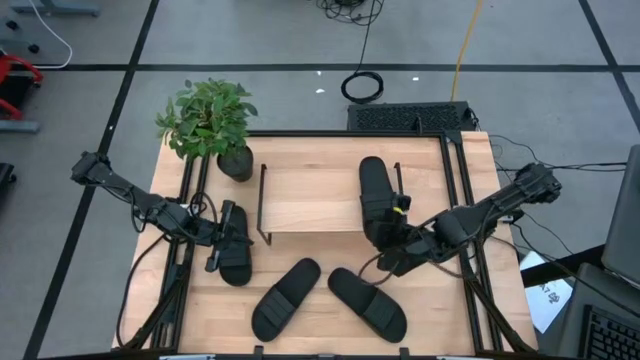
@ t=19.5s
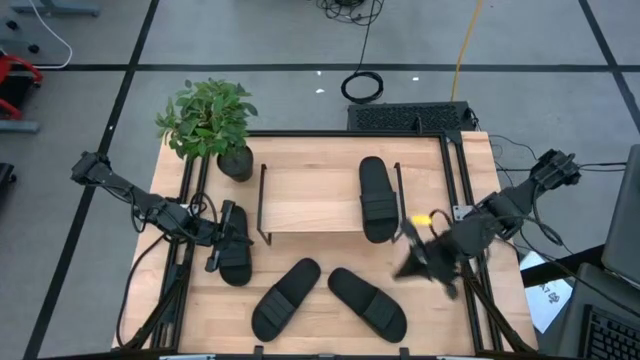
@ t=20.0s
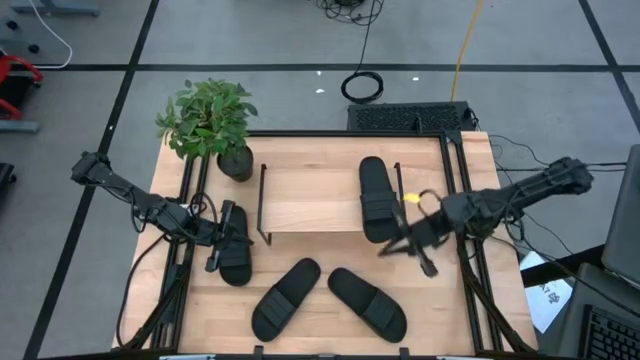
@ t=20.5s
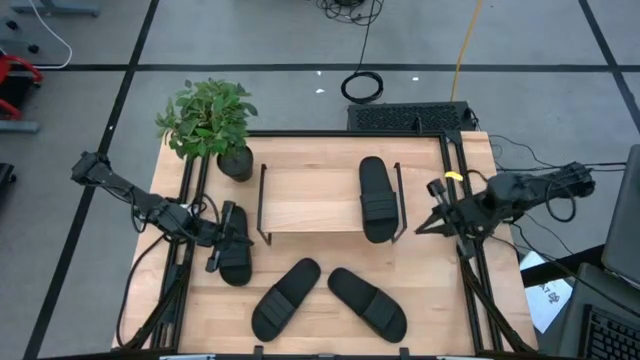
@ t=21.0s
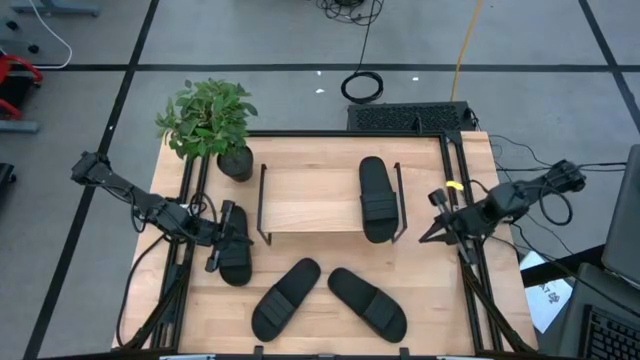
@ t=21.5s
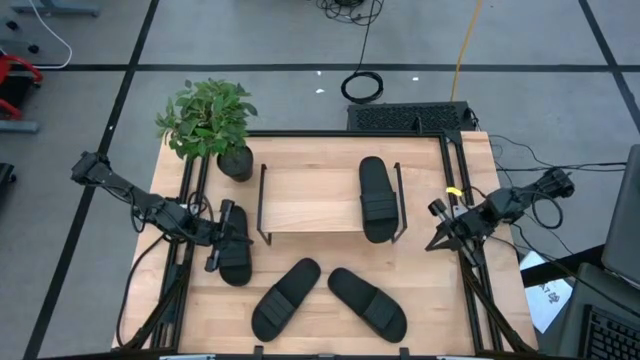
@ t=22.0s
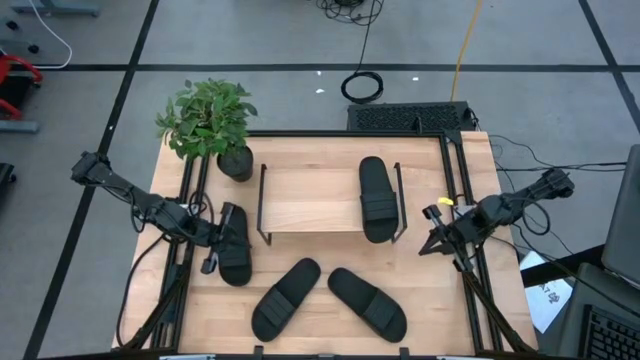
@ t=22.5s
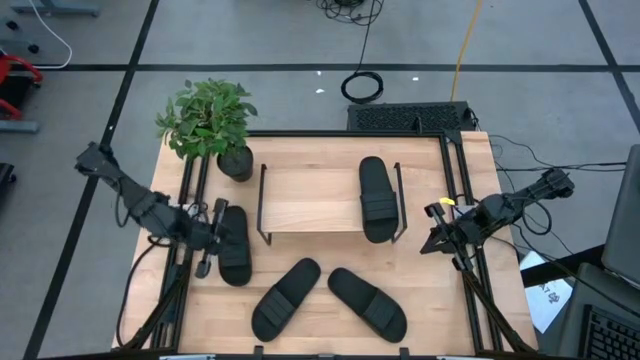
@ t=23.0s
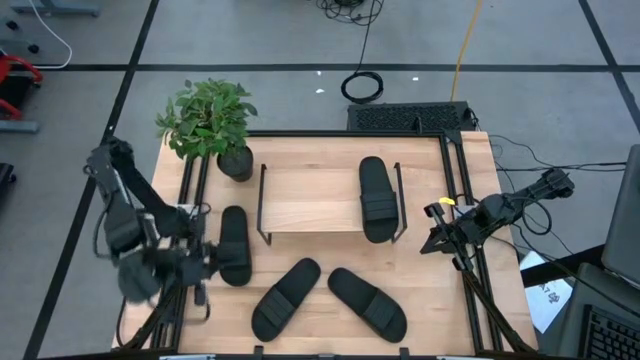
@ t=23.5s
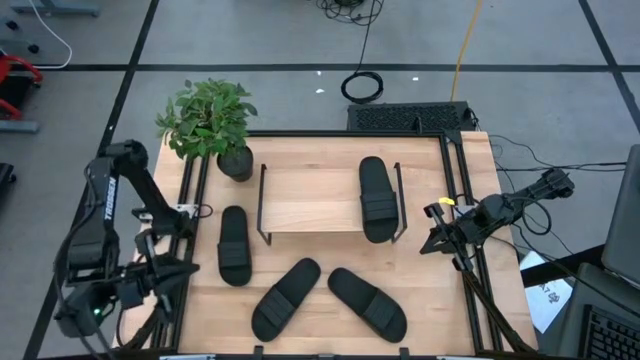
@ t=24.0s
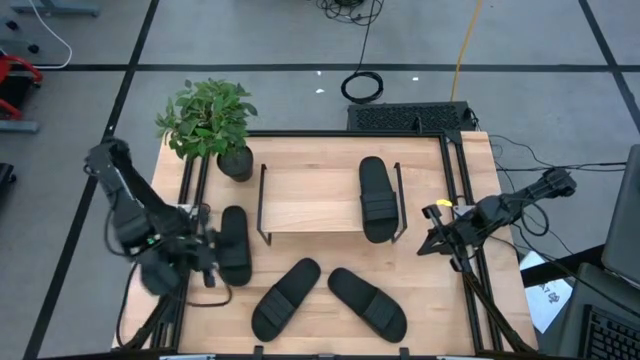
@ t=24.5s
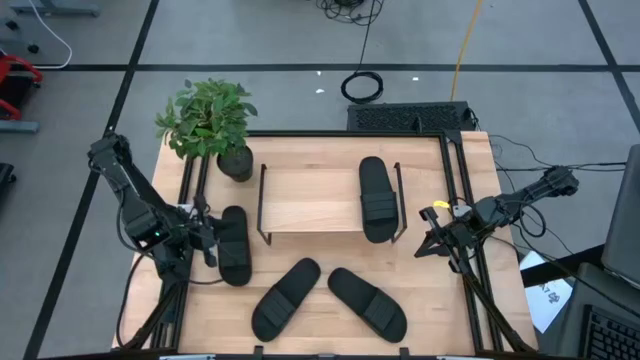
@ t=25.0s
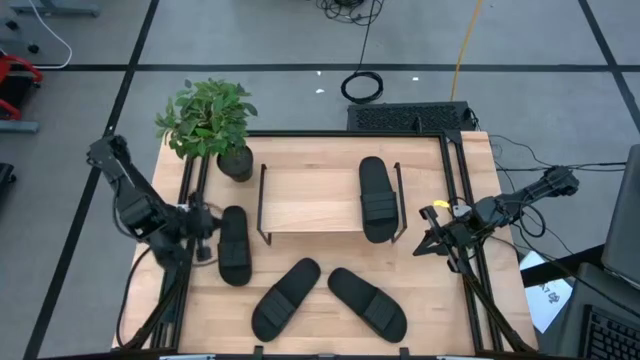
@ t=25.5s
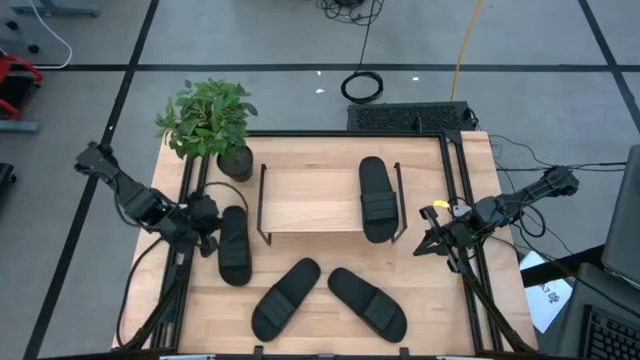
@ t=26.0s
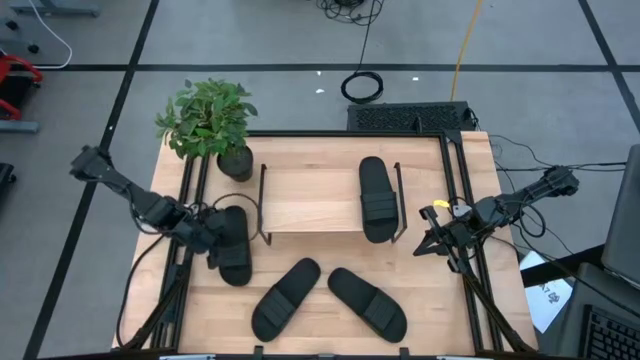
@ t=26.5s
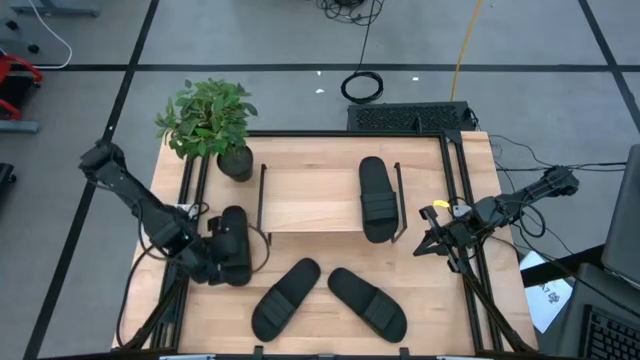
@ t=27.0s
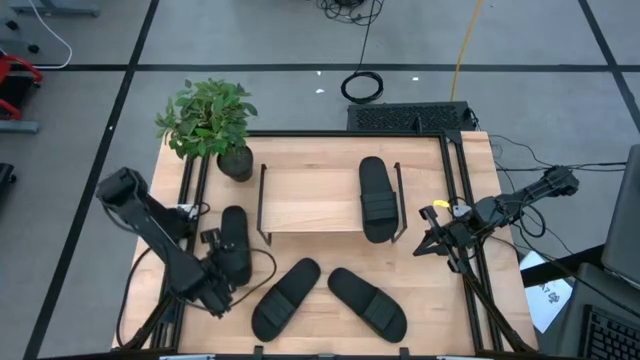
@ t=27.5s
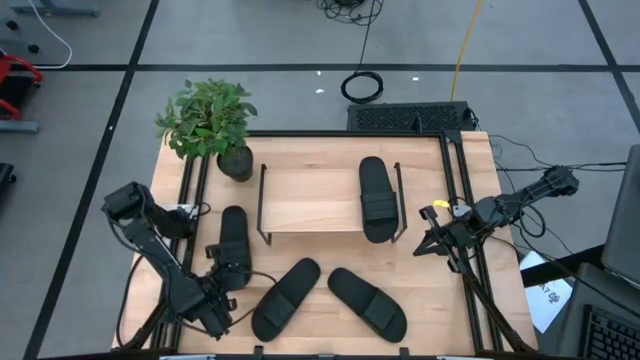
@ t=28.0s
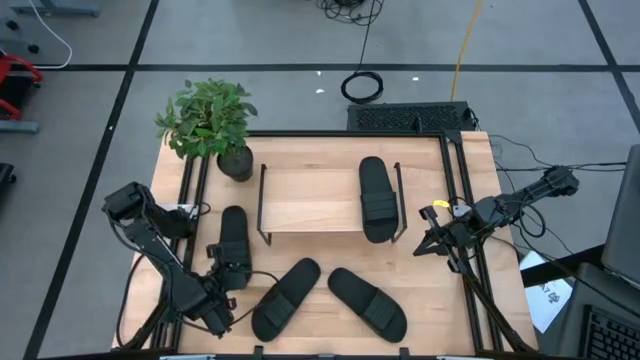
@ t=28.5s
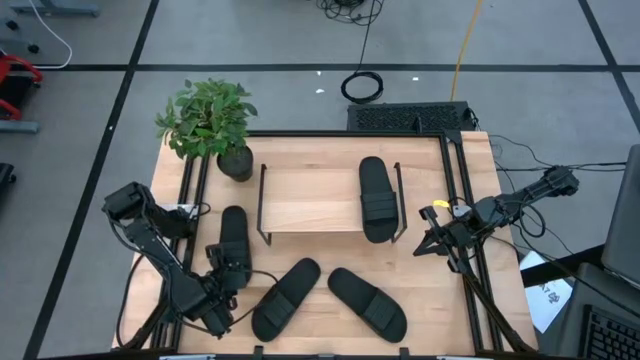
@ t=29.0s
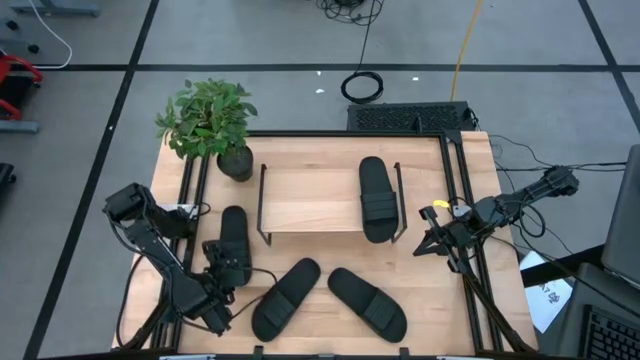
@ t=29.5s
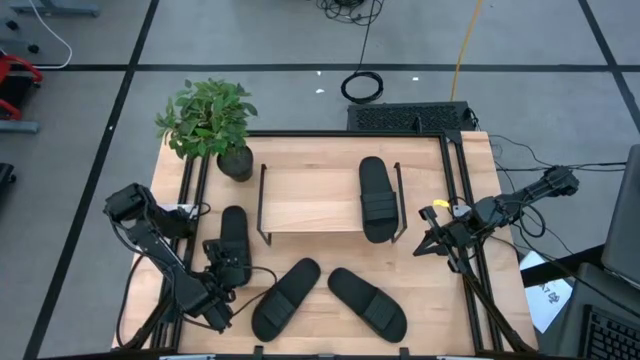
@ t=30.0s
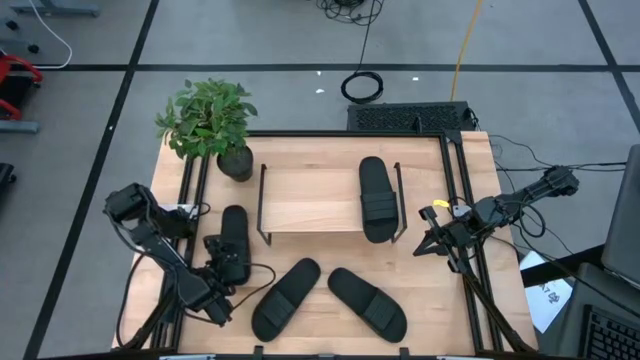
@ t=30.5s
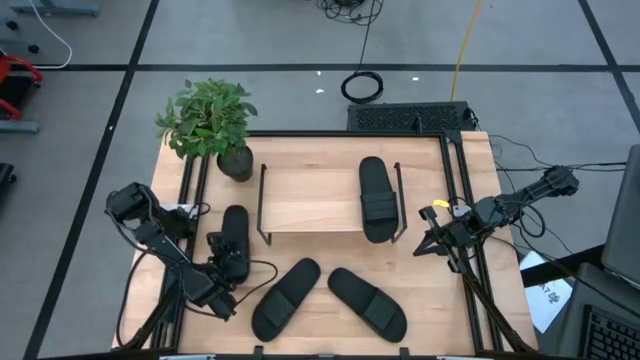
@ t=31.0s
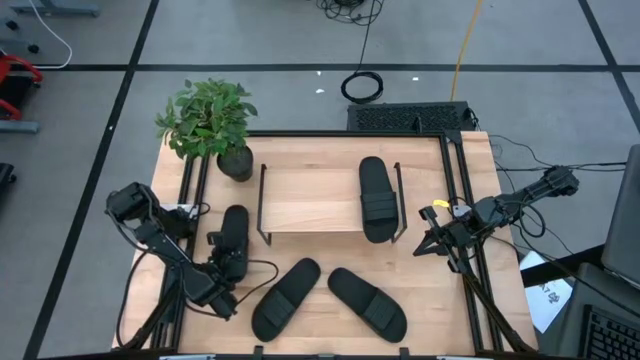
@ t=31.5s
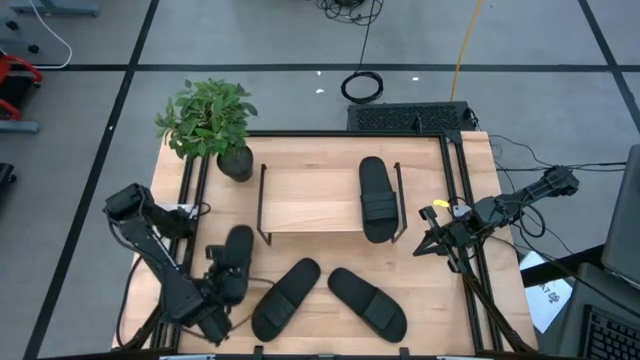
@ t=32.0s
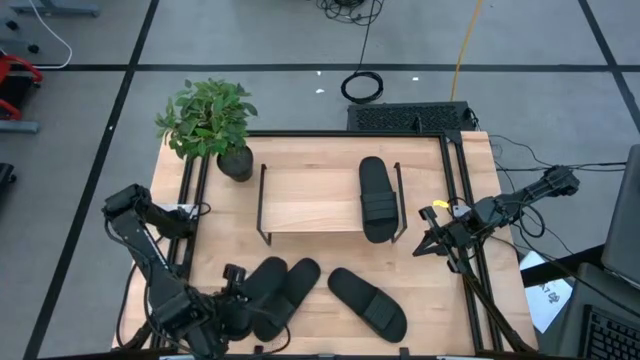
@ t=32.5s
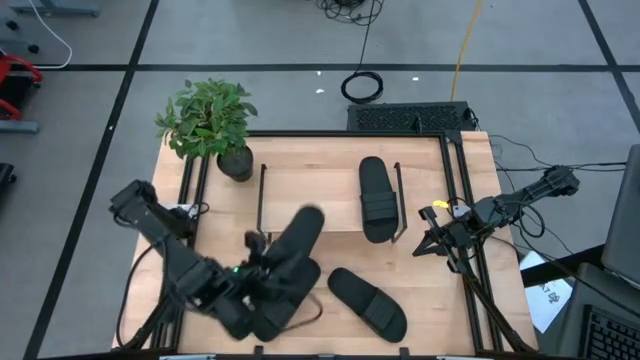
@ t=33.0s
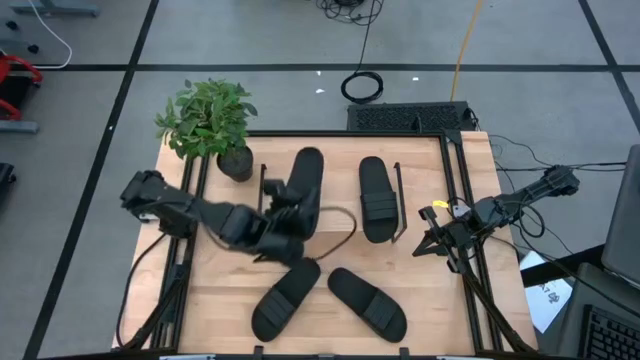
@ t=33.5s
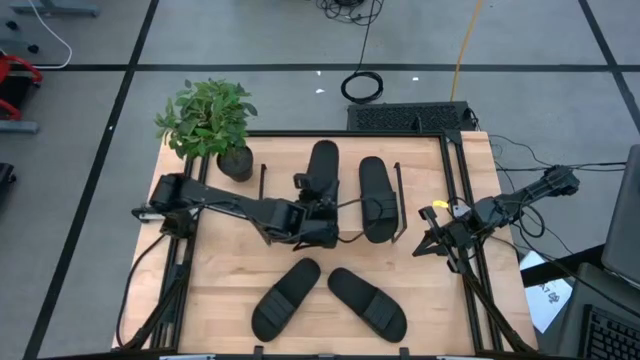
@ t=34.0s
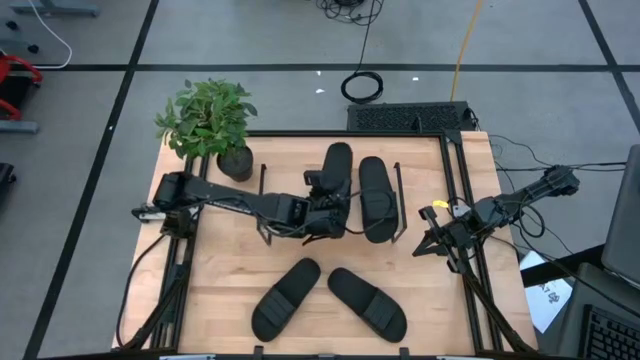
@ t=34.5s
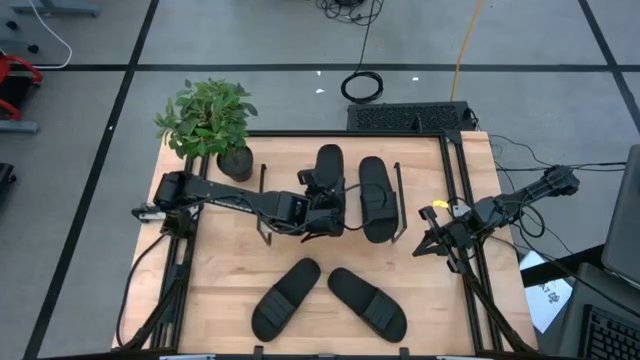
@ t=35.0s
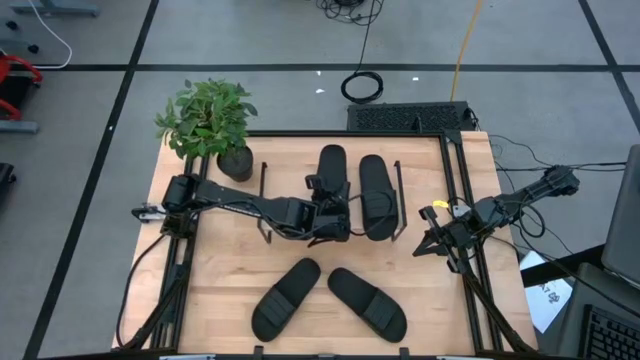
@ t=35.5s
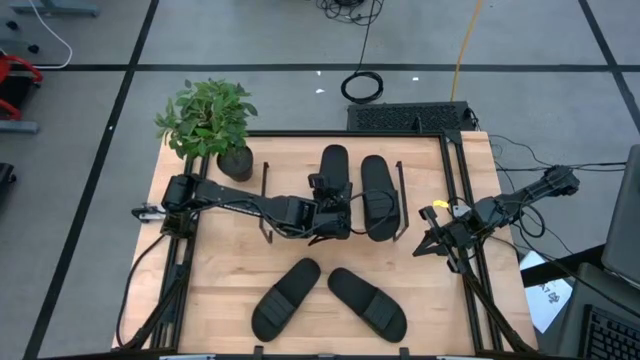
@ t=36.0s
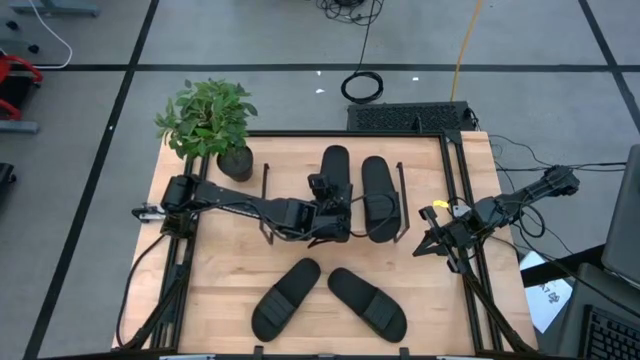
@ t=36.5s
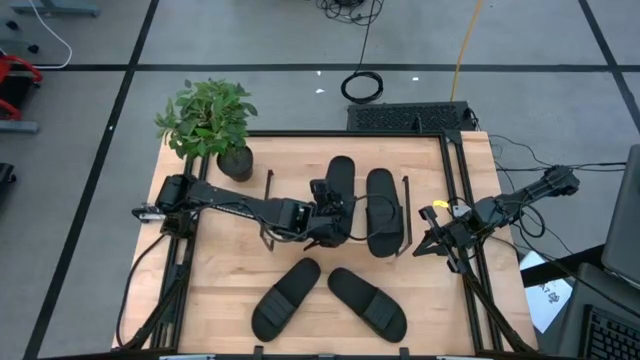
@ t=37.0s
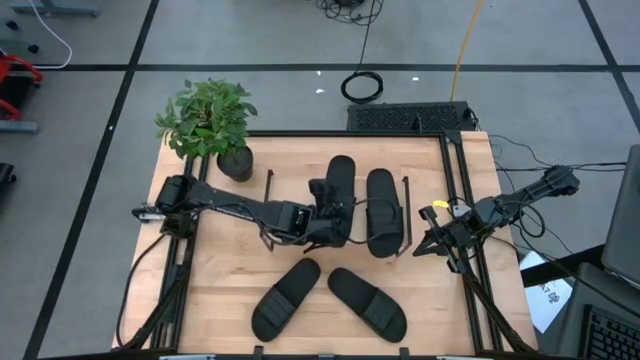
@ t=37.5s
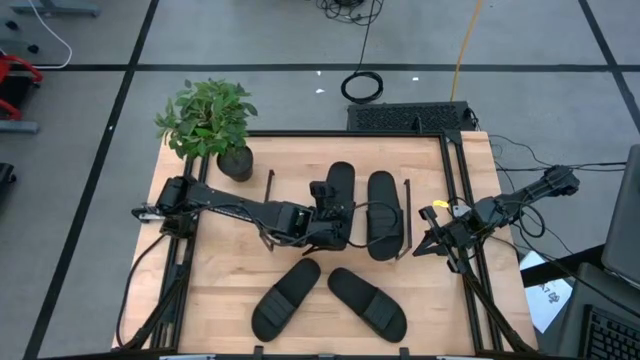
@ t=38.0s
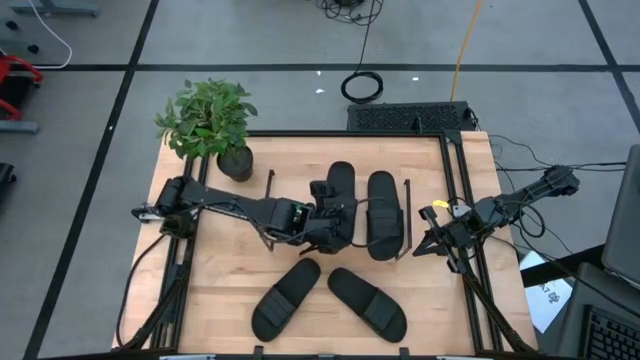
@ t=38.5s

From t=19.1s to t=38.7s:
Task: Pick and place slides into the shelf
Put the black slipper on the shelf

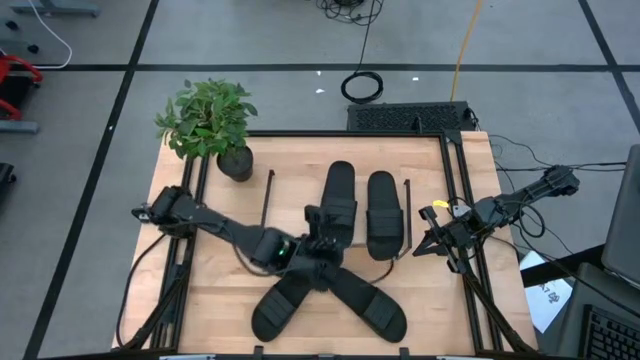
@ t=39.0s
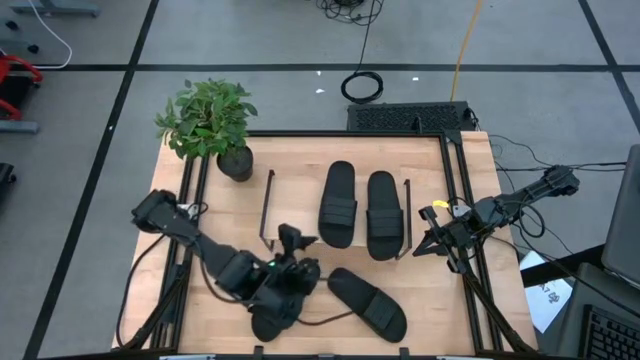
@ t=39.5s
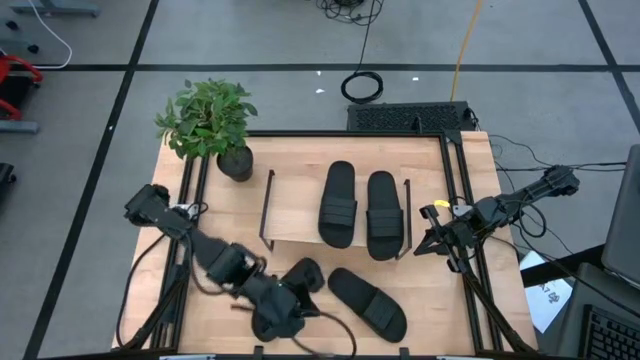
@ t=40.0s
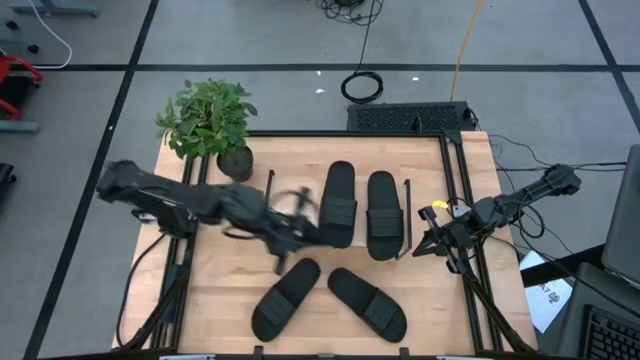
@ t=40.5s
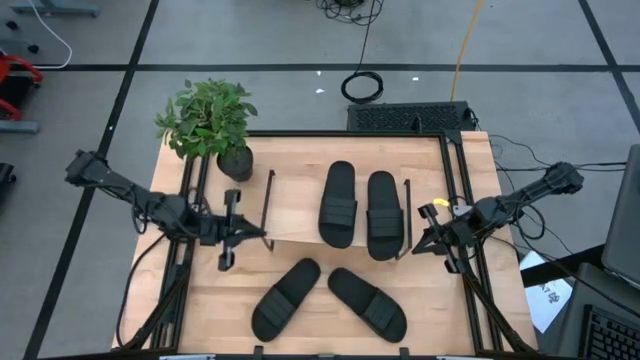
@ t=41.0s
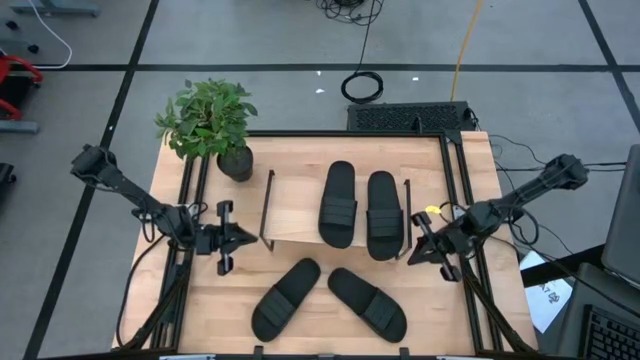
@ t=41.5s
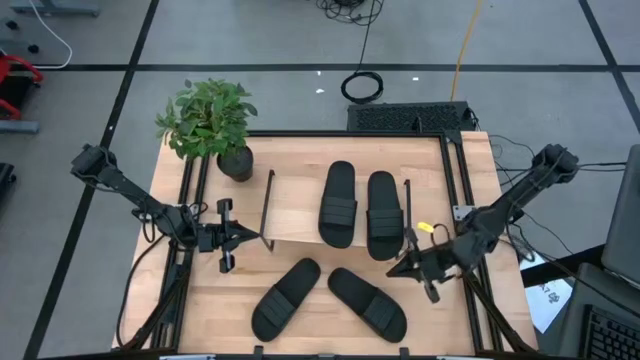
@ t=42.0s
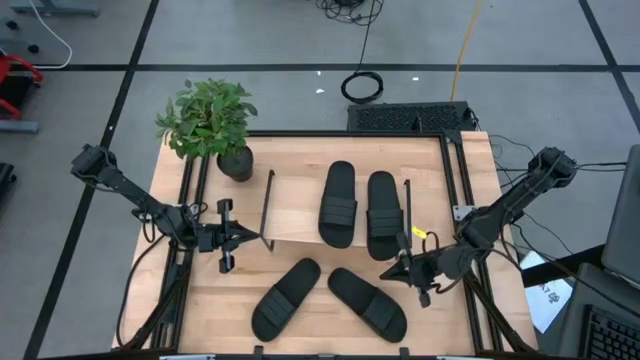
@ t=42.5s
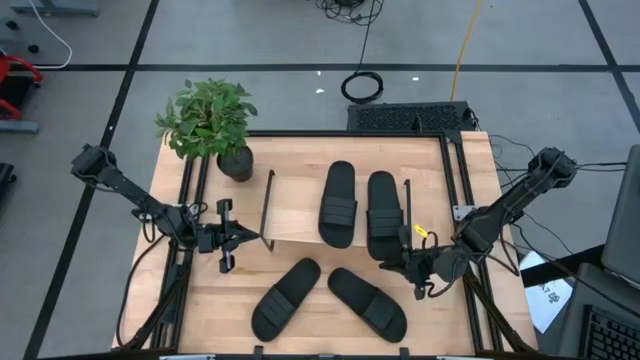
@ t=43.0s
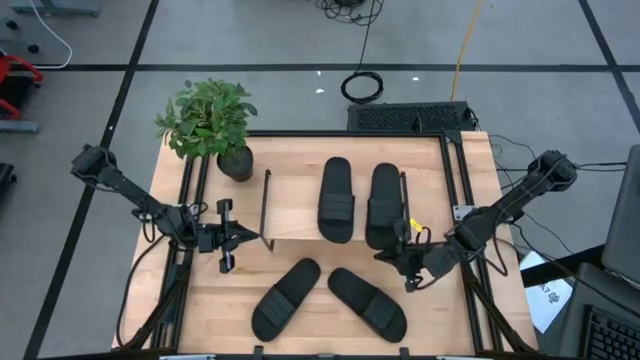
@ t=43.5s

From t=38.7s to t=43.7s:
Adjust the shelf on the table
